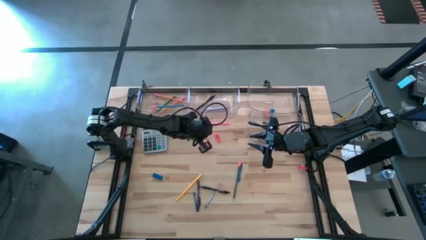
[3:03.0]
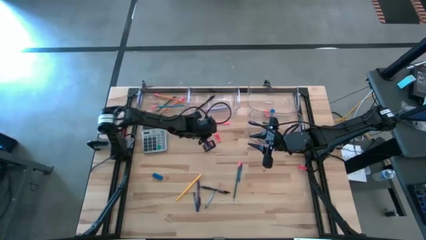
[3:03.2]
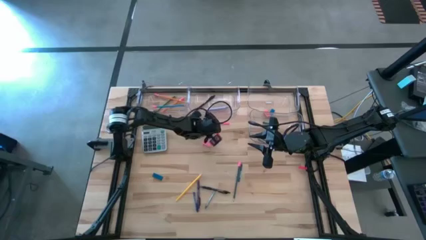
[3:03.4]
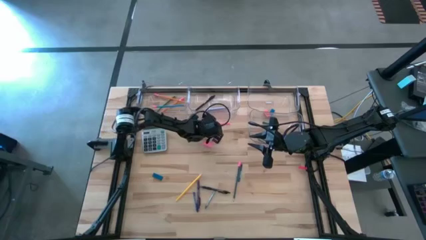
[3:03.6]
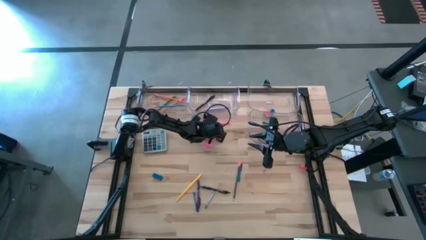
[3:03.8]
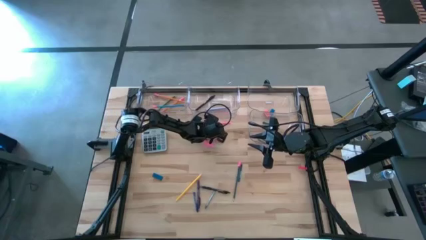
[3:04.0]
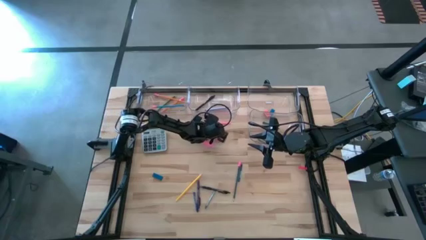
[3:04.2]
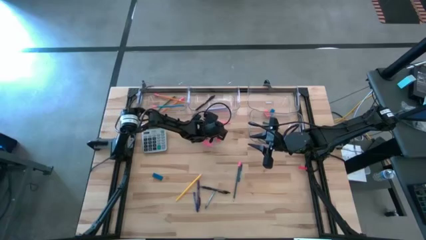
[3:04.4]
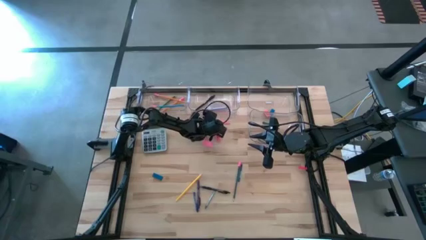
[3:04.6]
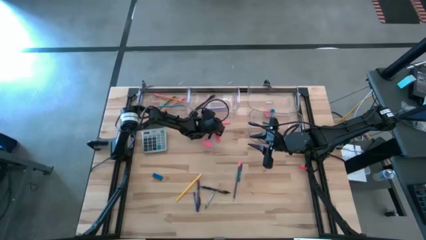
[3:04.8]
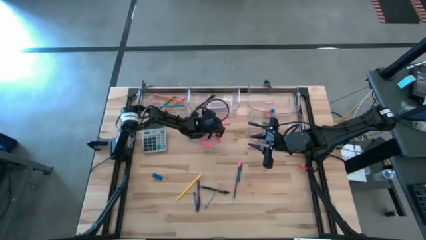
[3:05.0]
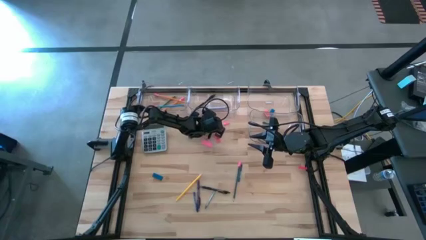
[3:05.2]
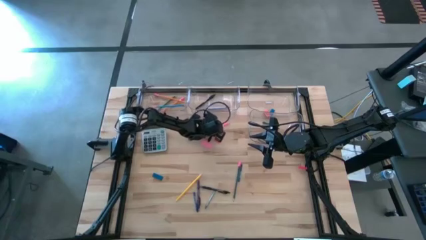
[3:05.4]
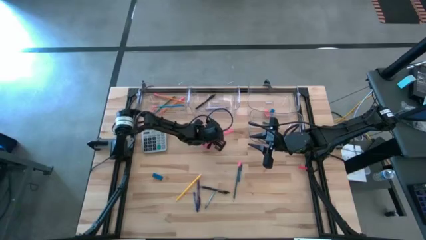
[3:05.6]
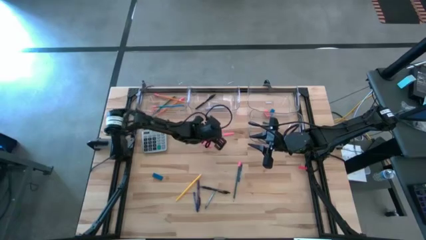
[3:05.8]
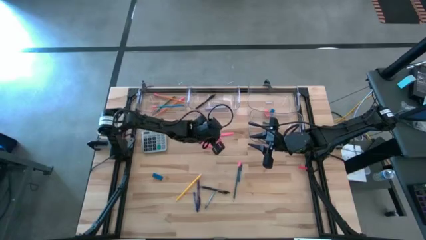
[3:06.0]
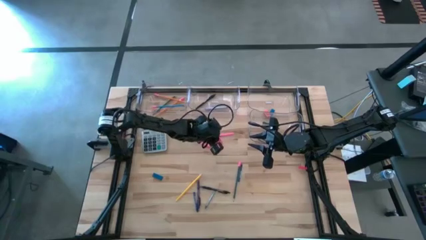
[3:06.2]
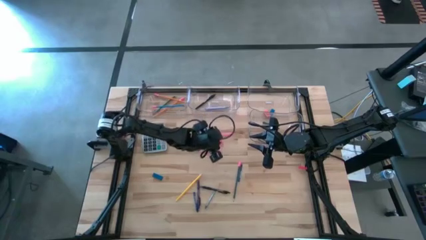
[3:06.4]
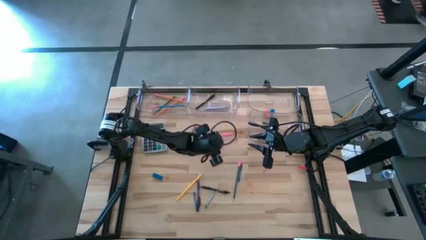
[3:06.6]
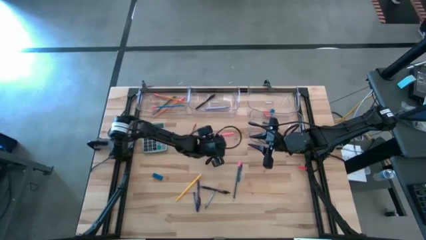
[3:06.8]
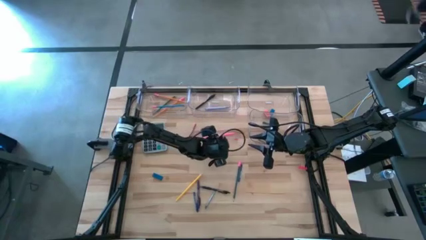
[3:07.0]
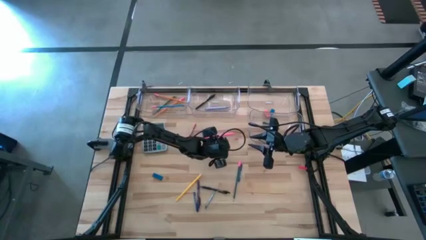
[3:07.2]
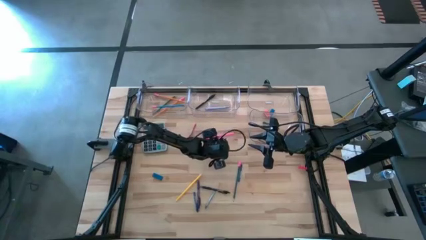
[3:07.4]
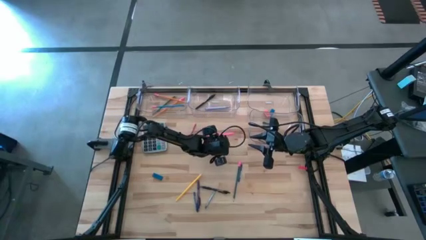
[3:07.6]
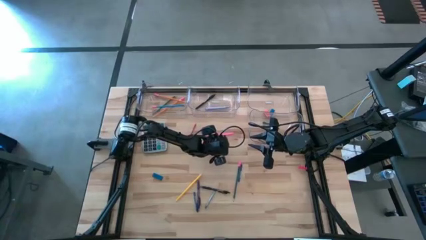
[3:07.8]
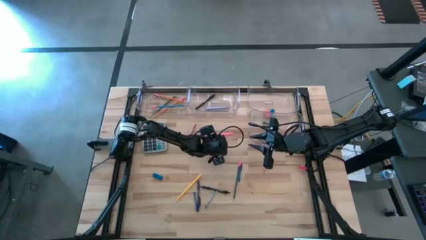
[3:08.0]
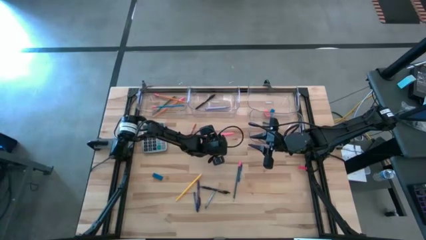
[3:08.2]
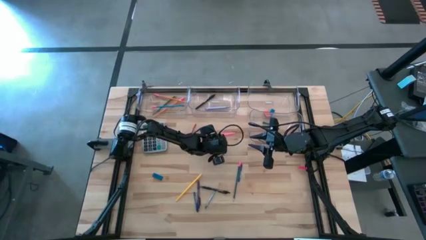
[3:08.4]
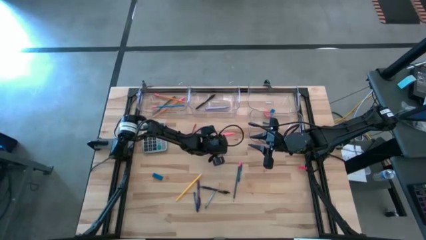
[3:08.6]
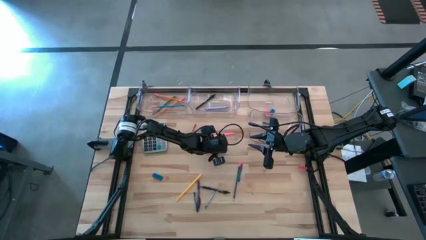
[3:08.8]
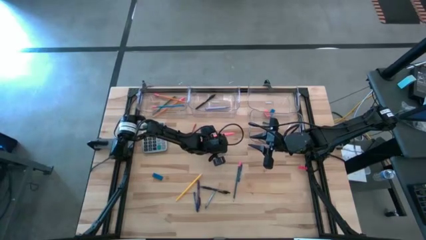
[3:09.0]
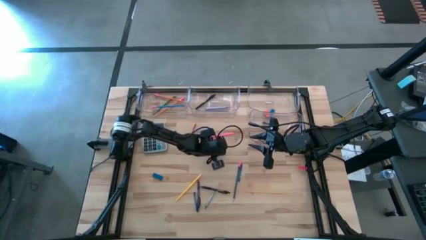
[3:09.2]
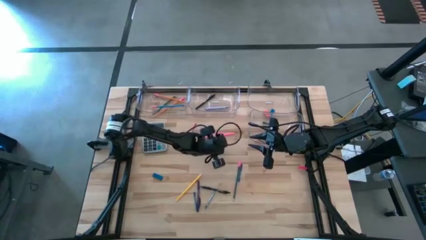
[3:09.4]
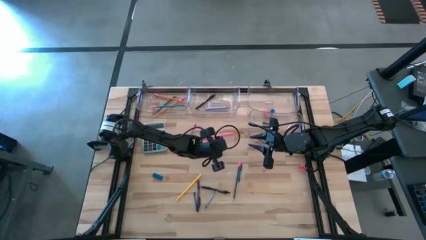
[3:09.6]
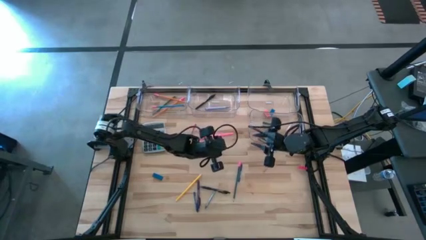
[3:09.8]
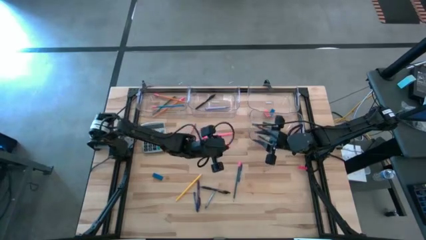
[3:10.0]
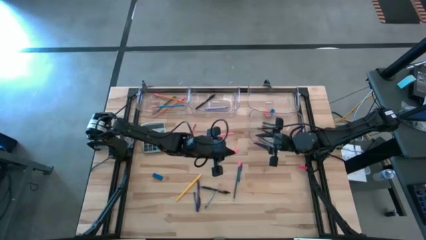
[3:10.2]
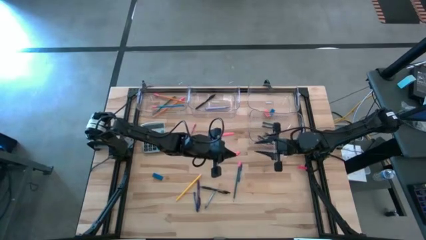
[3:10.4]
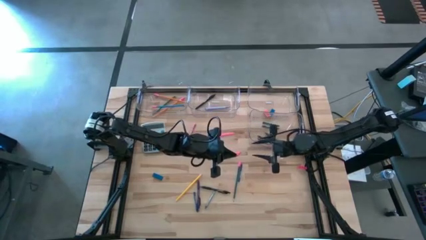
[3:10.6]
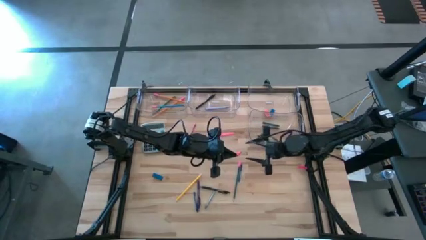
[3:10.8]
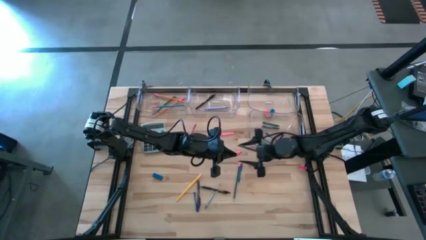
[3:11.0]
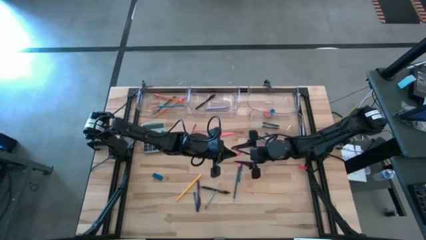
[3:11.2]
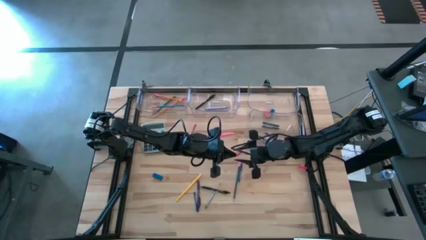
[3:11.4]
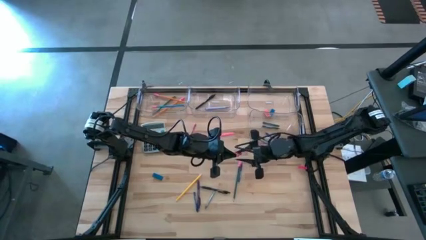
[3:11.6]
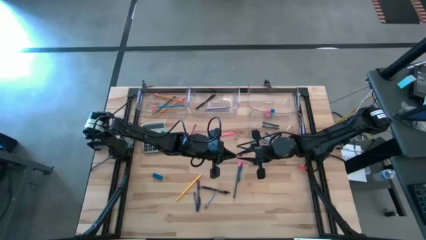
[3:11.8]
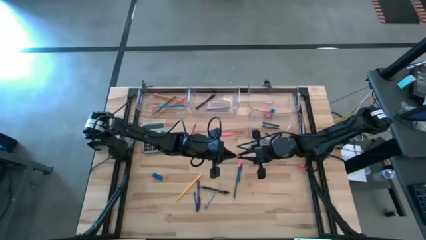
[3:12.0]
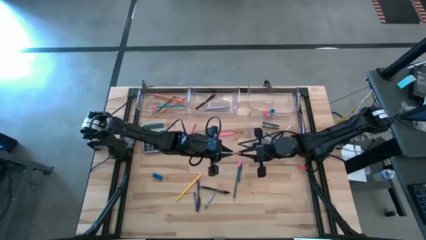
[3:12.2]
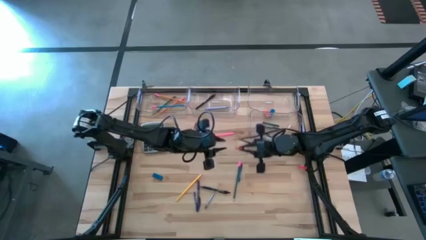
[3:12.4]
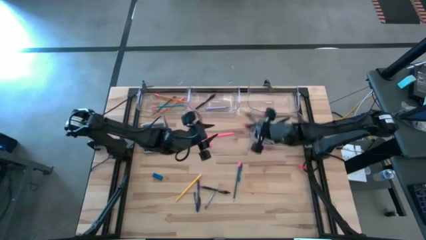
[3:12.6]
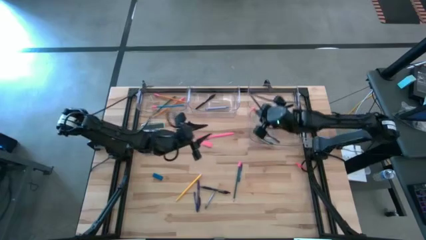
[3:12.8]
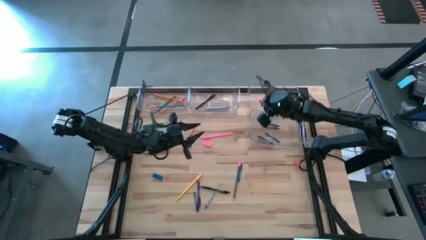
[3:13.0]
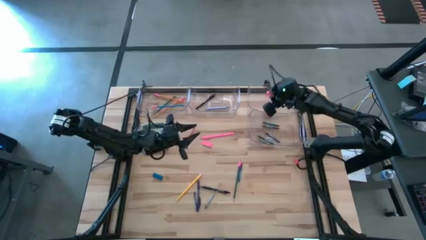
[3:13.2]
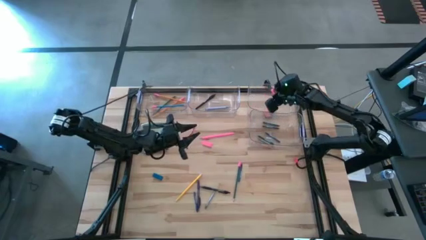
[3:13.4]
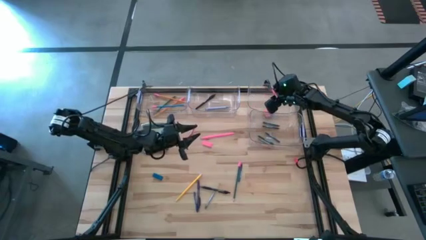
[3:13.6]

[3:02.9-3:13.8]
Task: Sort crayons/erasers/pens/pencils in bins
Put the orange eraser into the top right transparent bin

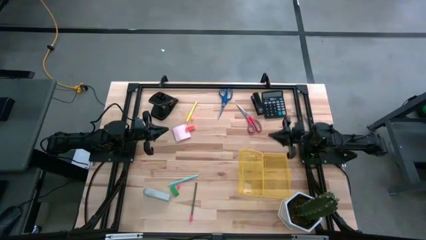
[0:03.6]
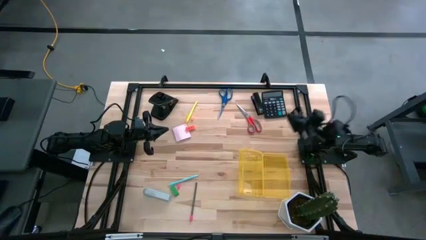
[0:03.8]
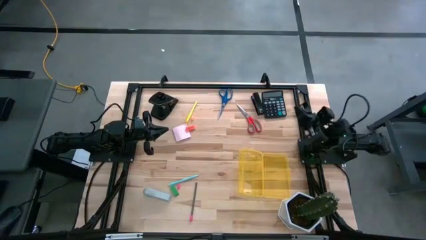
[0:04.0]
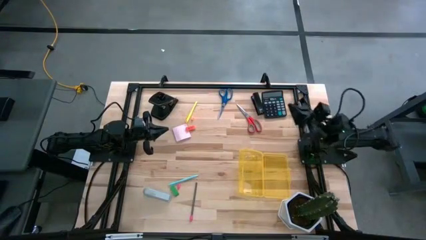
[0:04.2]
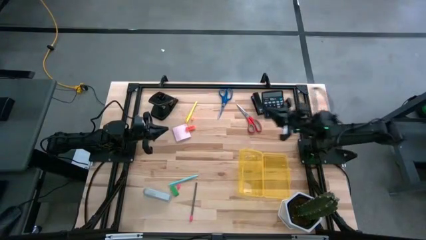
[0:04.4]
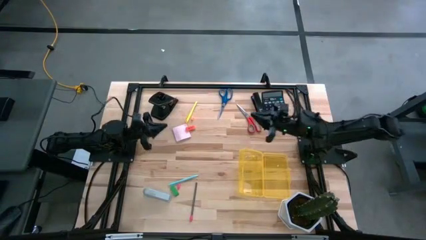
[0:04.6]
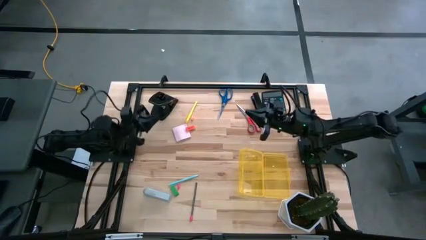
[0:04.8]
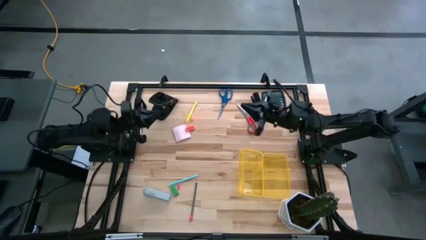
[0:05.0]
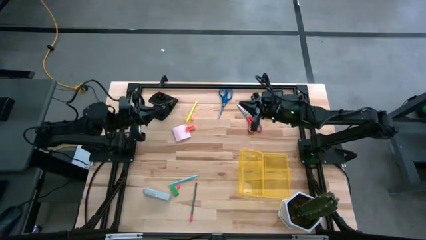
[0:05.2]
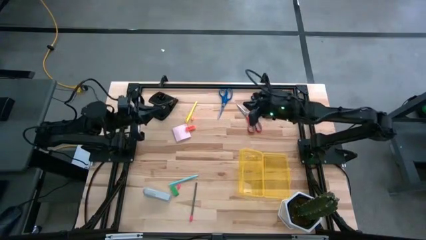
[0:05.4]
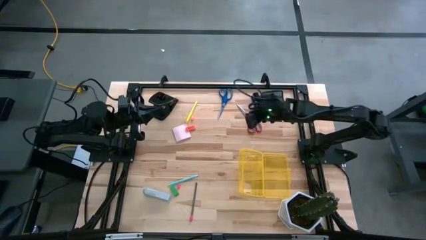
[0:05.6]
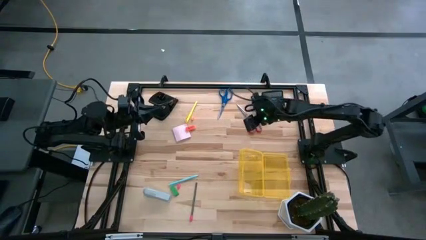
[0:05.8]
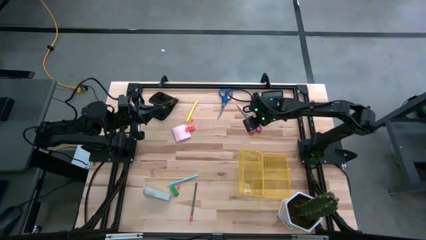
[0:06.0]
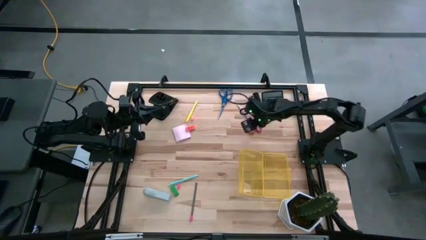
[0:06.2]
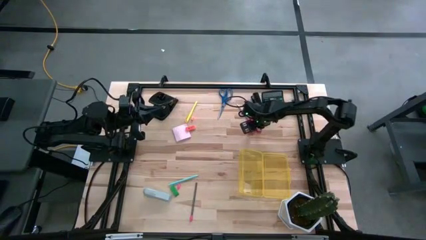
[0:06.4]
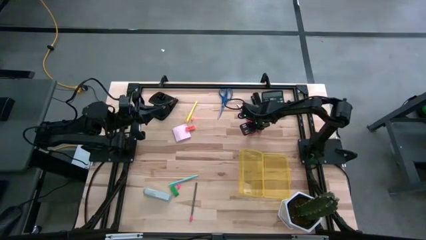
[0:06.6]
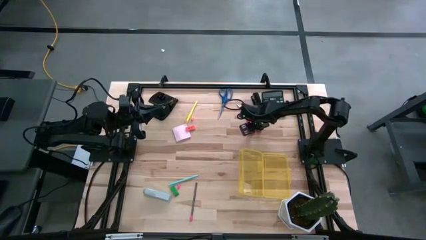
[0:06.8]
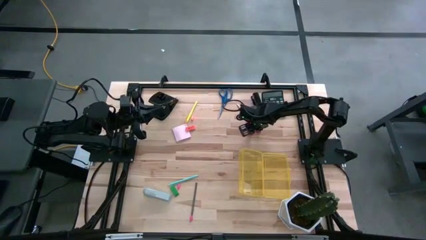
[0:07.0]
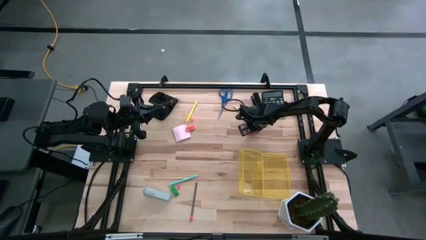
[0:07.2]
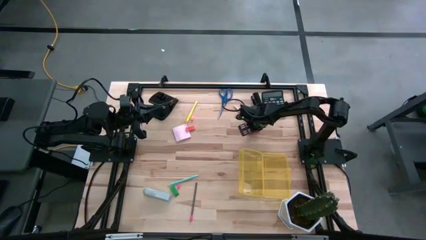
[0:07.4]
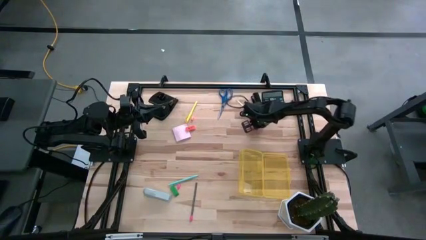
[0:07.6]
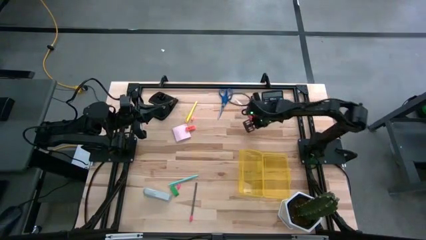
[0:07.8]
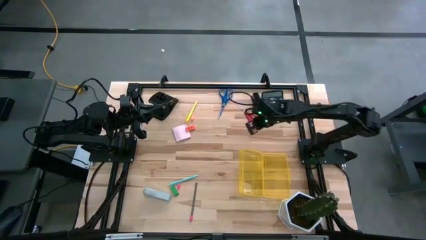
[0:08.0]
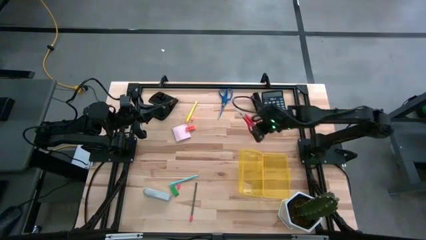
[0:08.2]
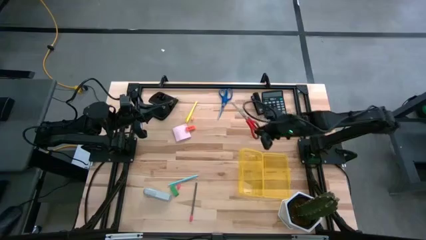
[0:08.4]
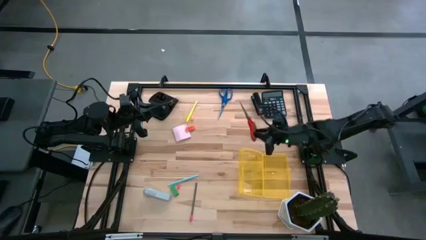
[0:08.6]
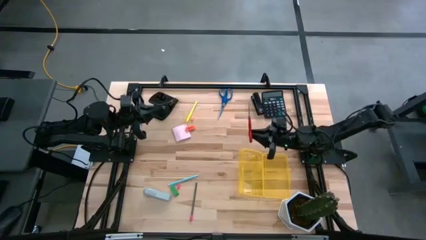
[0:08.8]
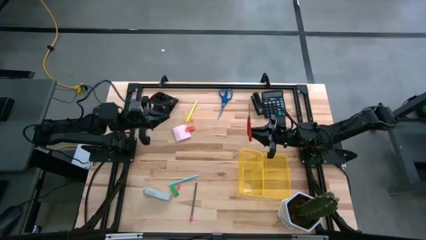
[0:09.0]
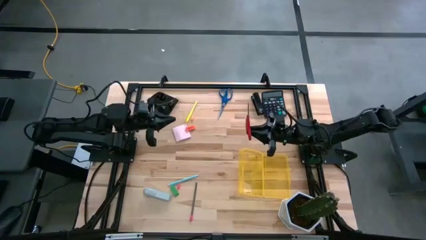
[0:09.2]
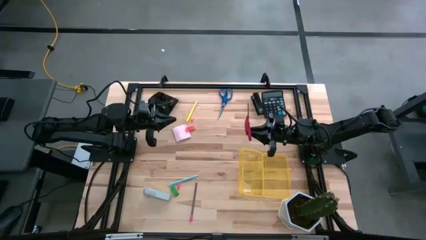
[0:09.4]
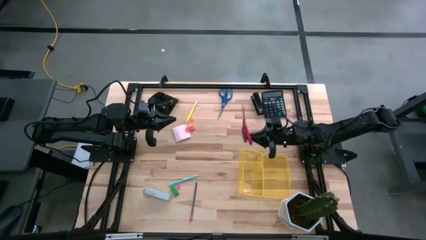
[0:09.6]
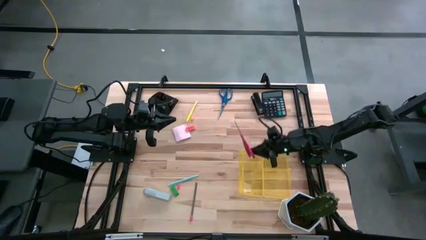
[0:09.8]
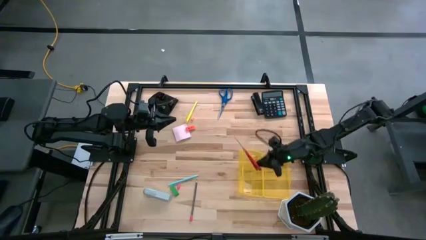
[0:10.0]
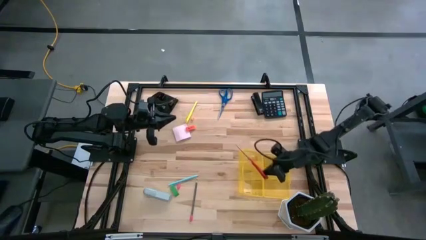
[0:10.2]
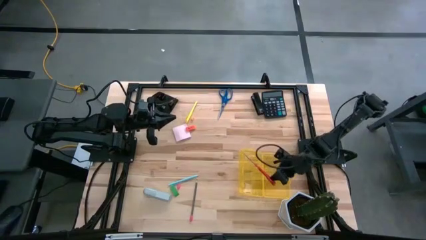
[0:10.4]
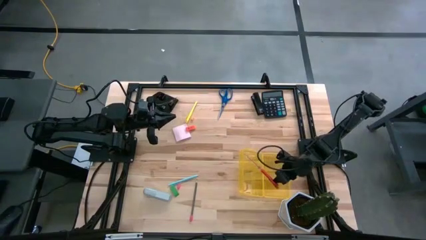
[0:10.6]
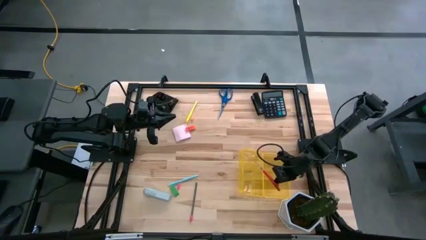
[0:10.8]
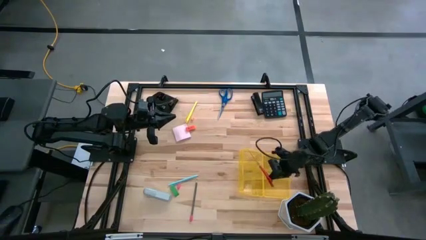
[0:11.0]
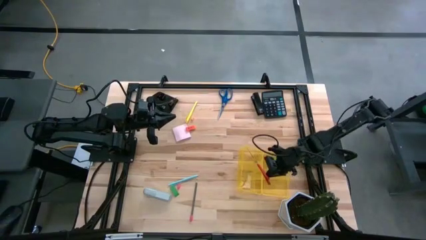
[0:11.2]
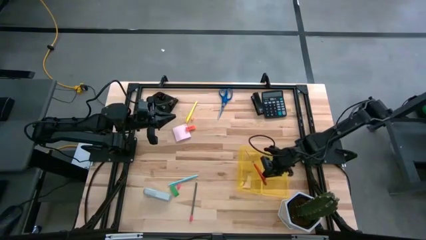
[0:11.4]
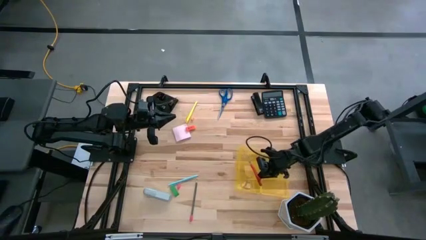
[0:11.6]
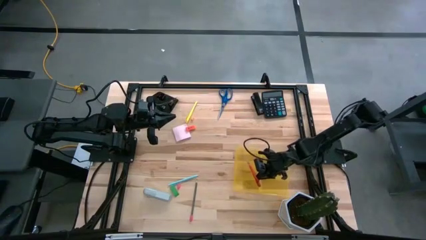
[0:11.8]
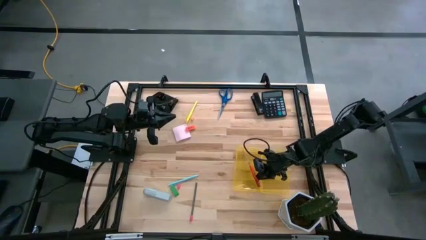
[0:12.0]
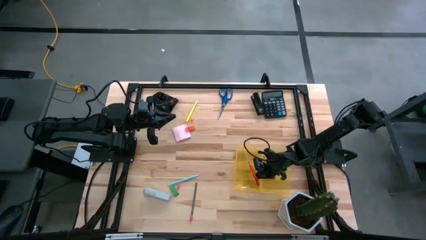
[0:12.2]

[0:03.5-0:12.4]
Task: Pack school essentials
Put the red scissors into the supply box
